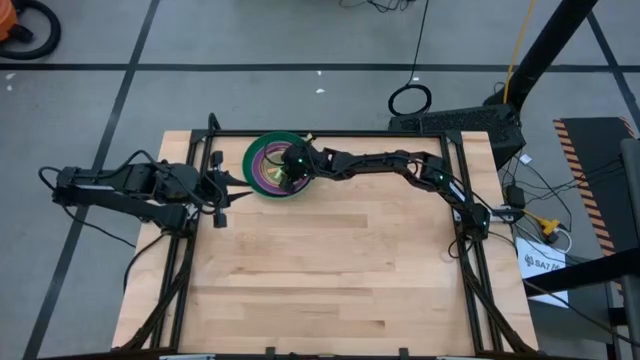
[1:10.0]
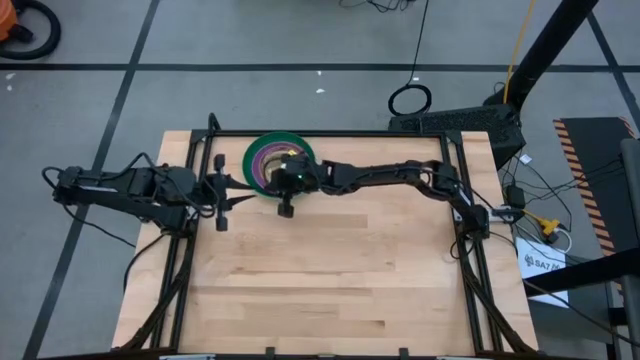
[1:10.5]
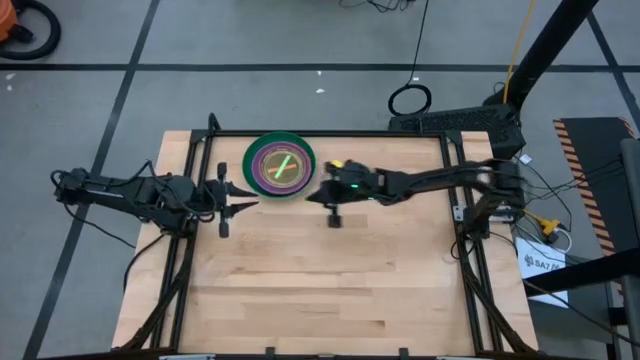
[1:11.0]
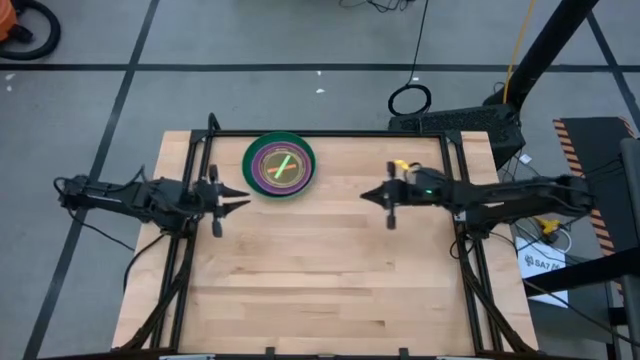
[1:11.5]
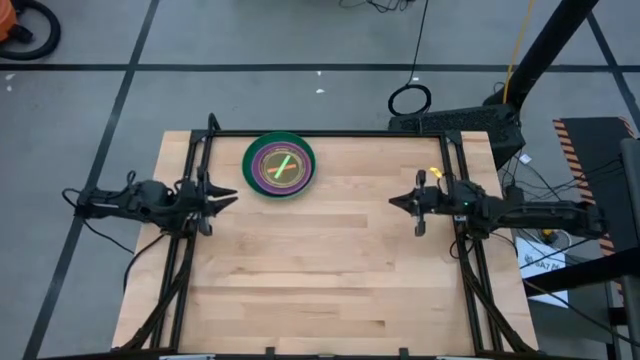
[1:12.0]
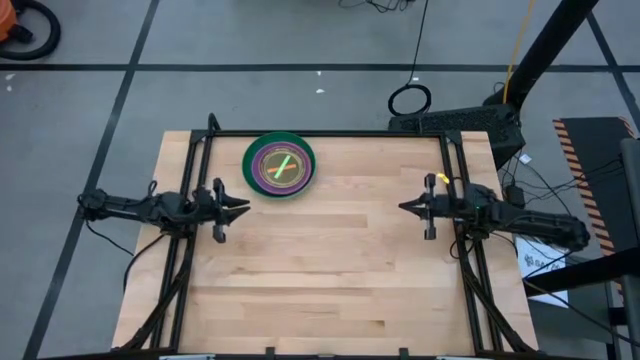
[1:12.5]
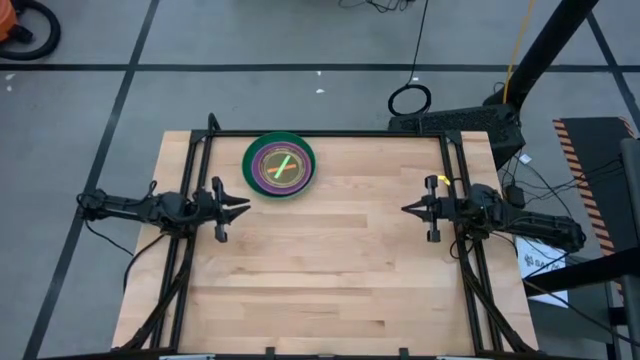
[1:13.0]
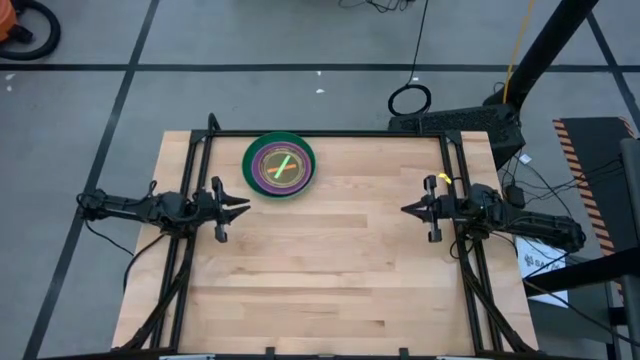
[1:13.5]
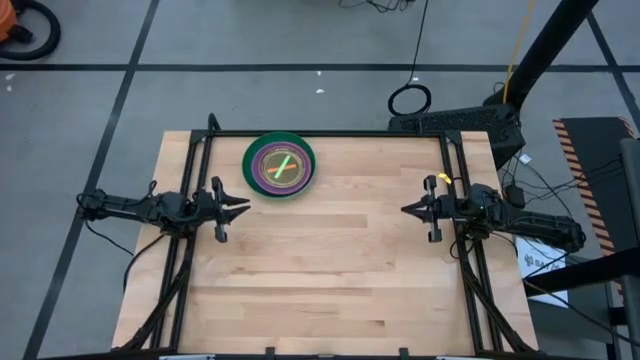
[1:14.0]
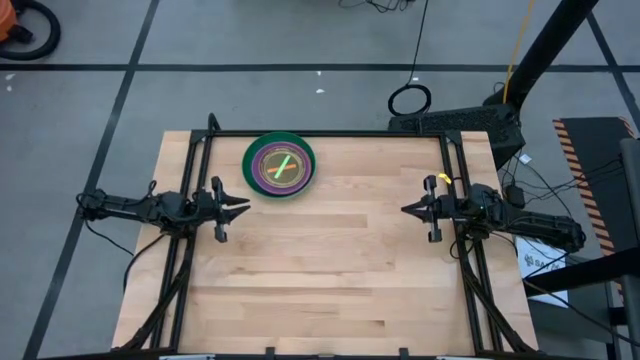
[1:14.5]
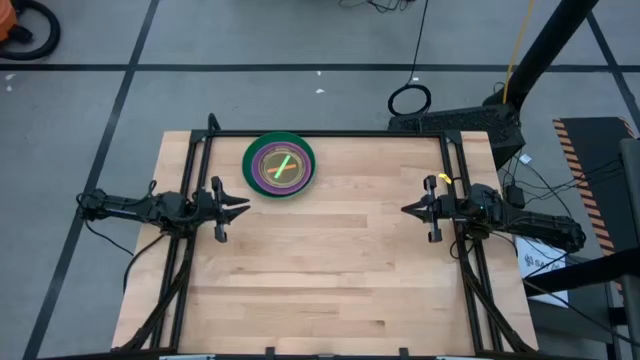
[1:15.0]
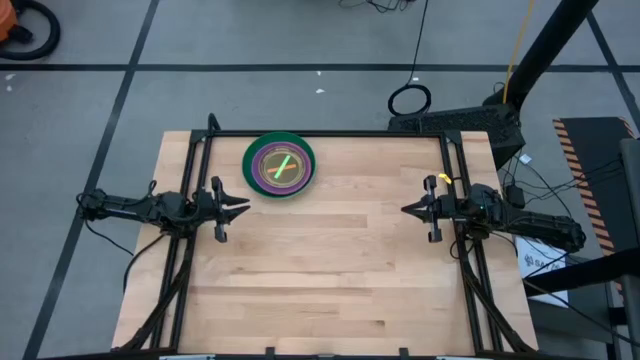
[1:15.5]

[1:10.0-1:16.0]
Task: Stack plastic plates
Return to Home Position

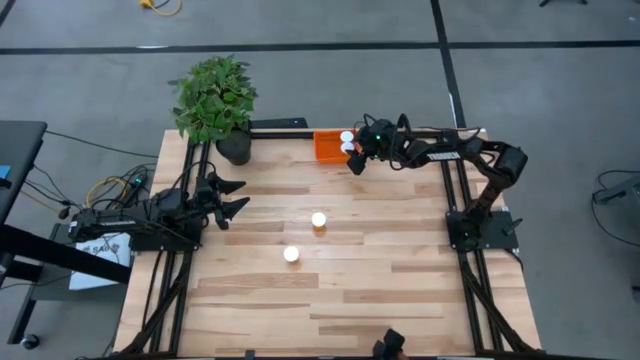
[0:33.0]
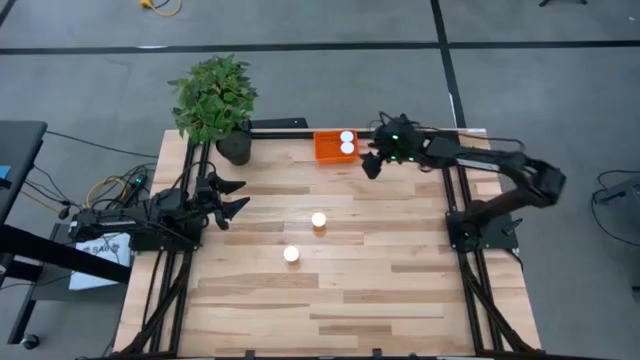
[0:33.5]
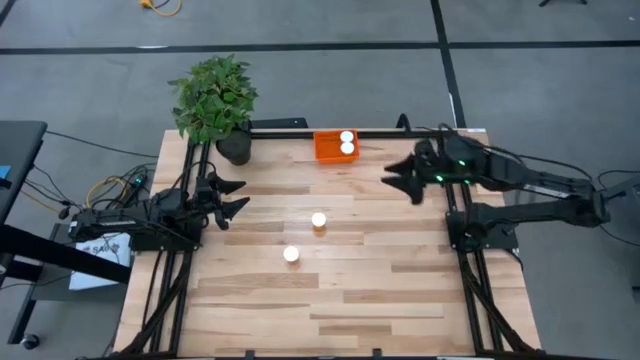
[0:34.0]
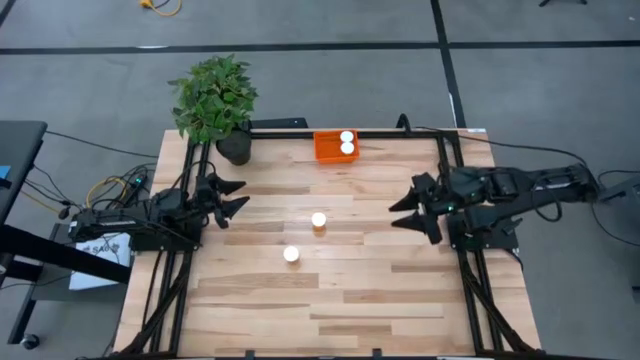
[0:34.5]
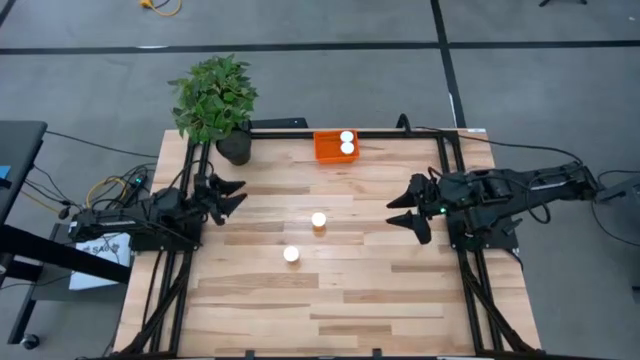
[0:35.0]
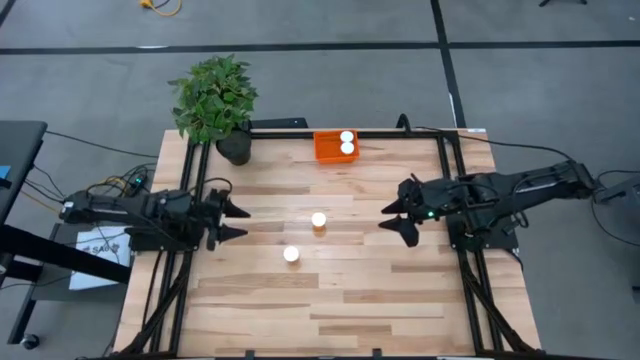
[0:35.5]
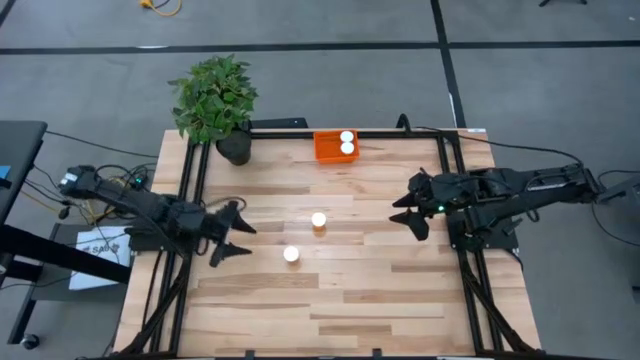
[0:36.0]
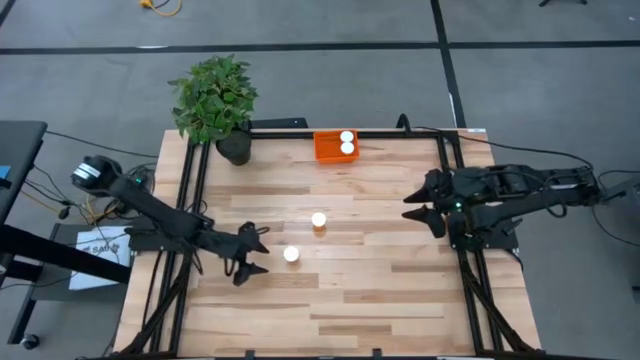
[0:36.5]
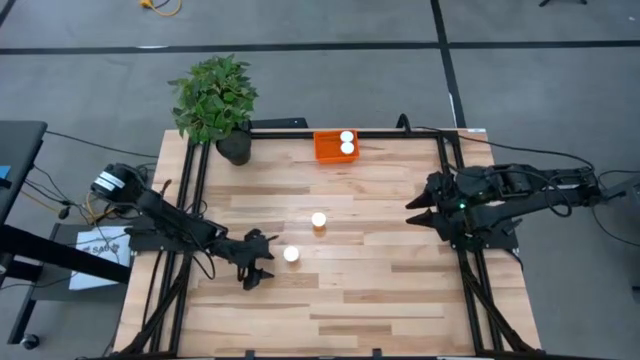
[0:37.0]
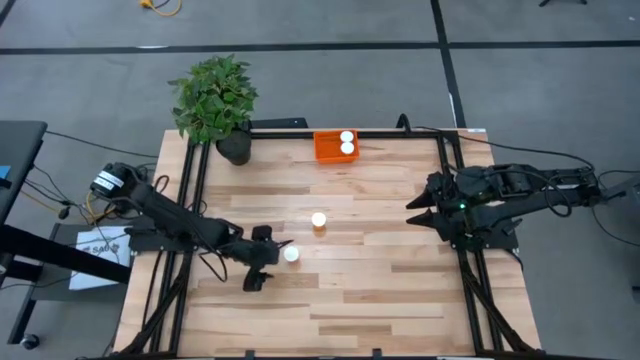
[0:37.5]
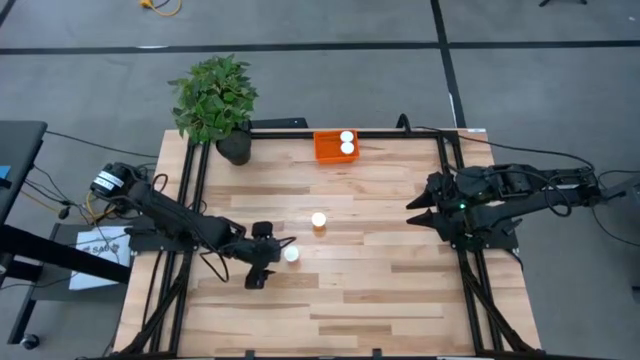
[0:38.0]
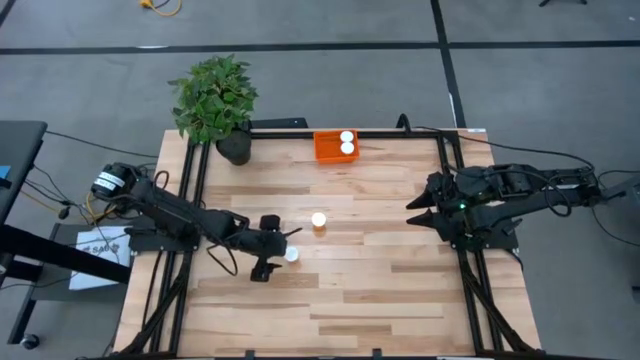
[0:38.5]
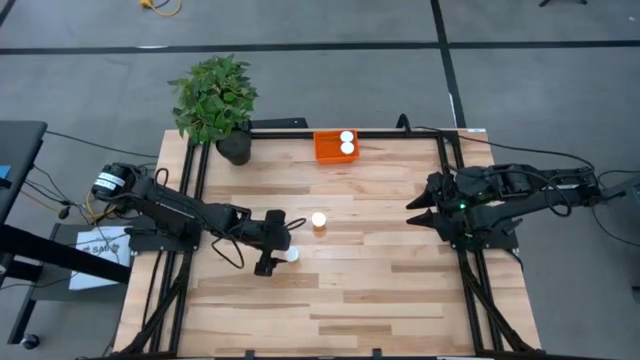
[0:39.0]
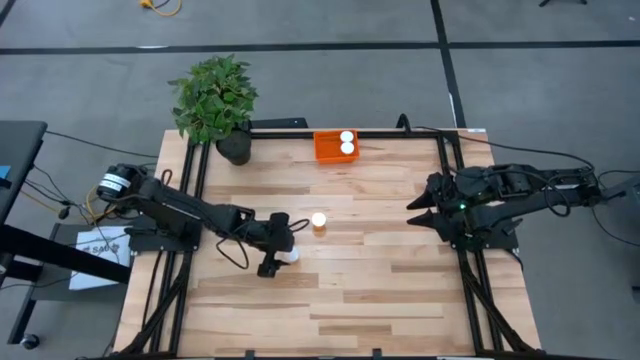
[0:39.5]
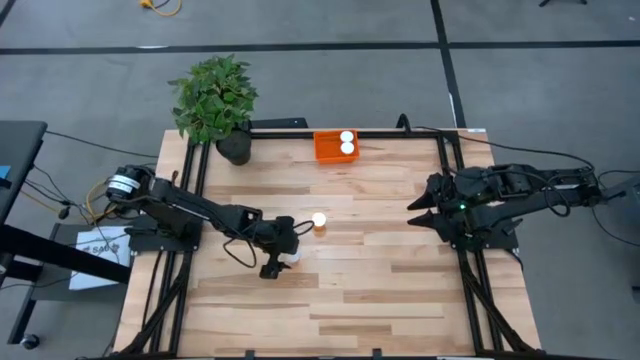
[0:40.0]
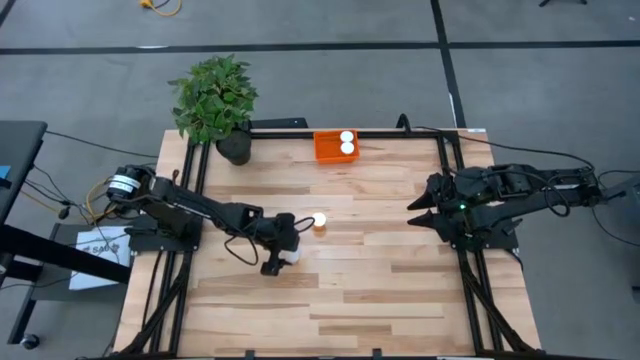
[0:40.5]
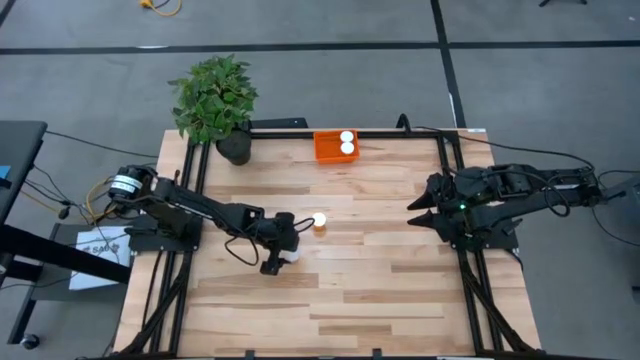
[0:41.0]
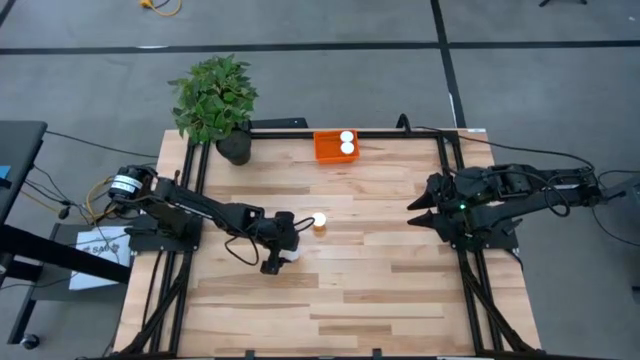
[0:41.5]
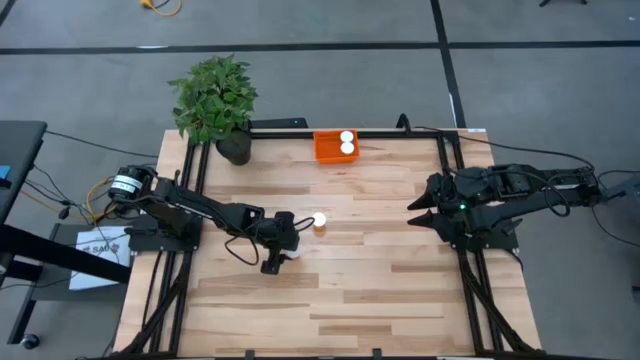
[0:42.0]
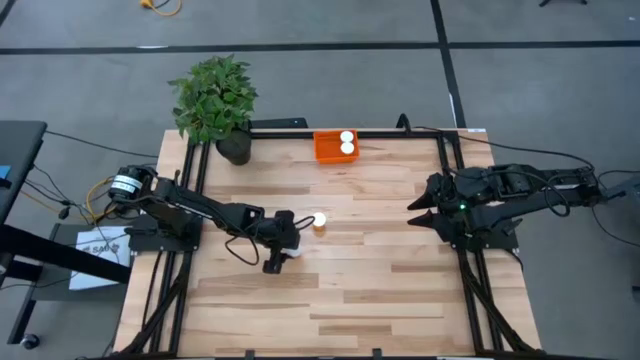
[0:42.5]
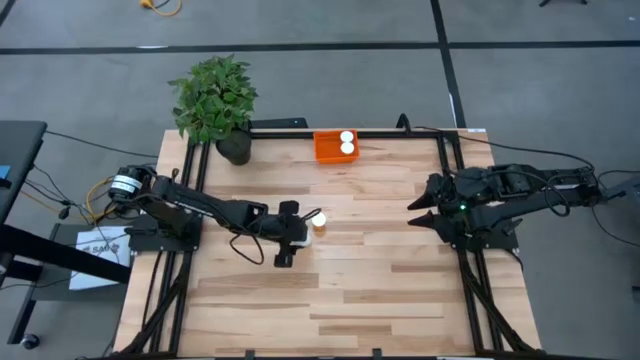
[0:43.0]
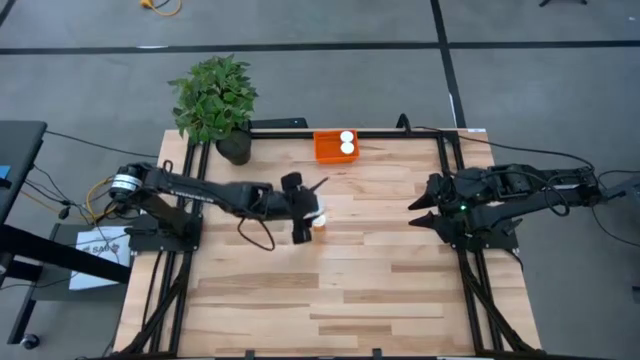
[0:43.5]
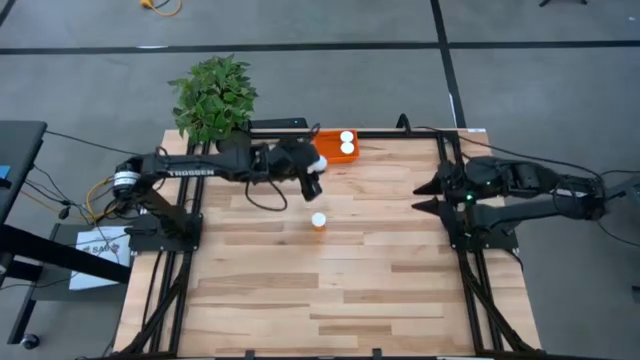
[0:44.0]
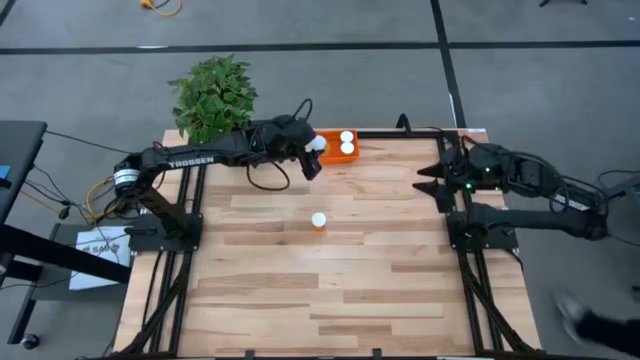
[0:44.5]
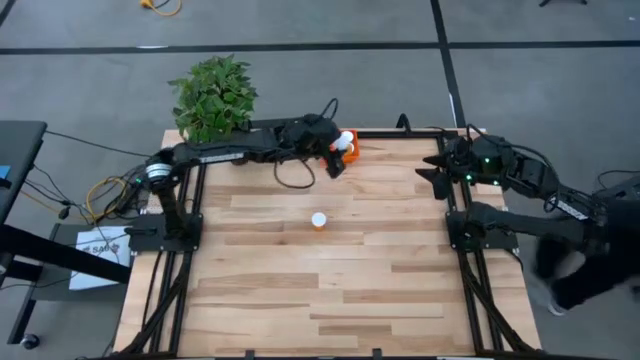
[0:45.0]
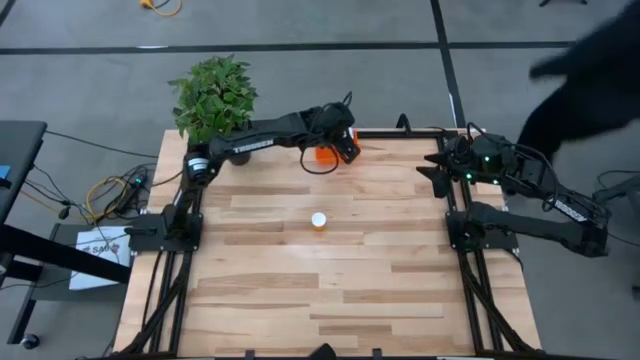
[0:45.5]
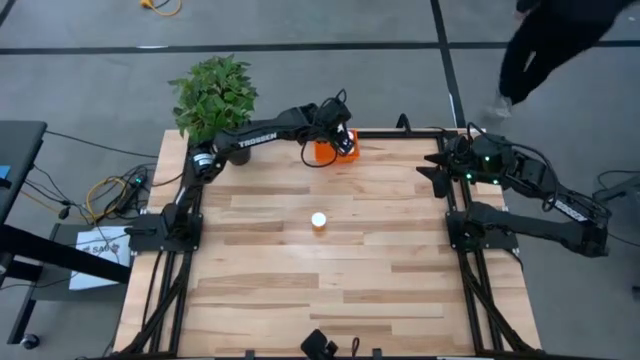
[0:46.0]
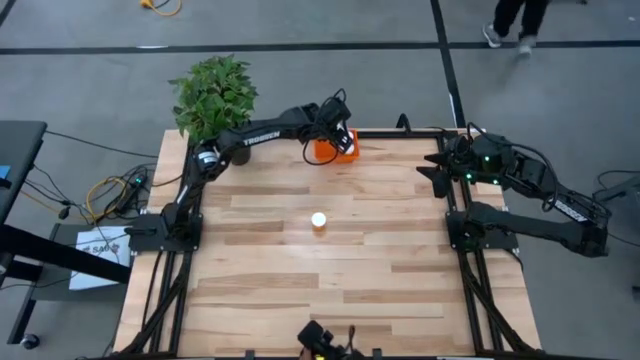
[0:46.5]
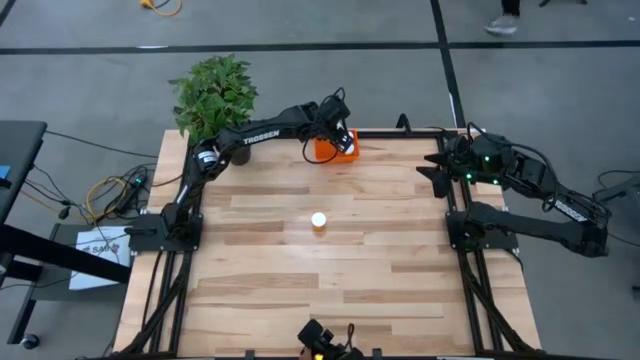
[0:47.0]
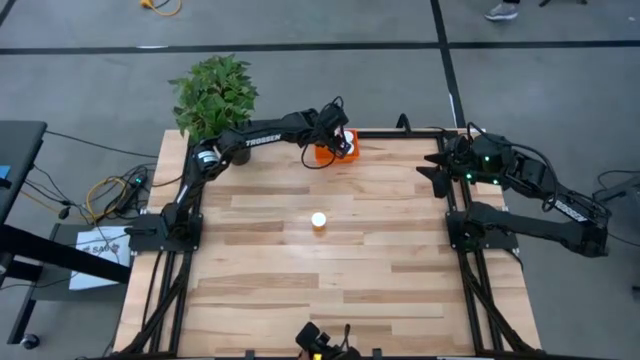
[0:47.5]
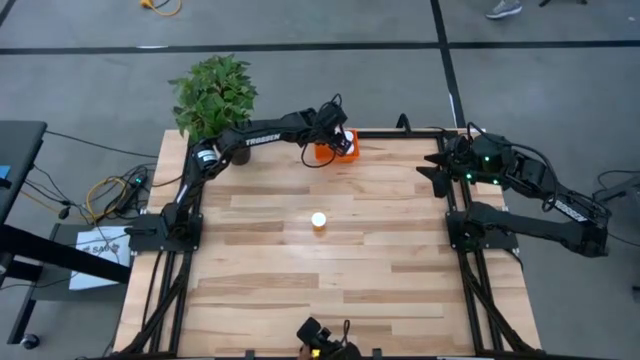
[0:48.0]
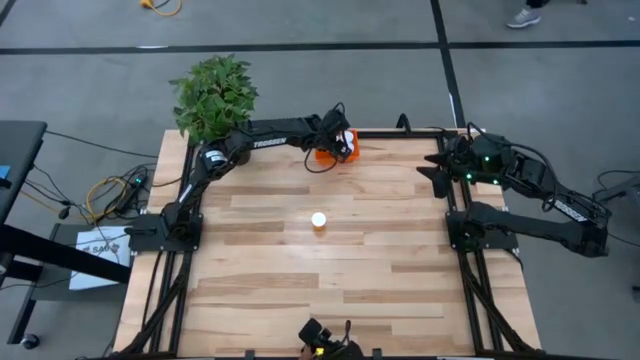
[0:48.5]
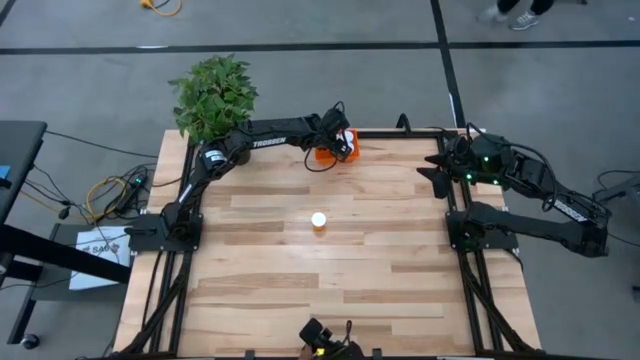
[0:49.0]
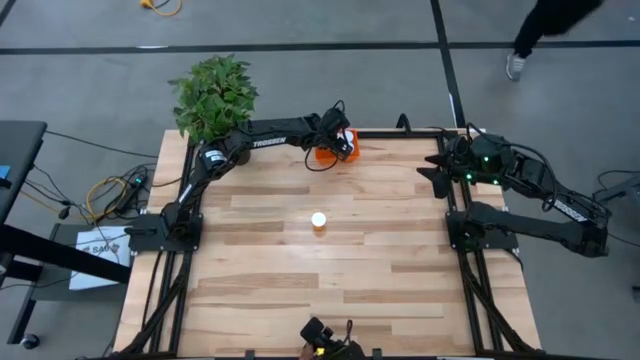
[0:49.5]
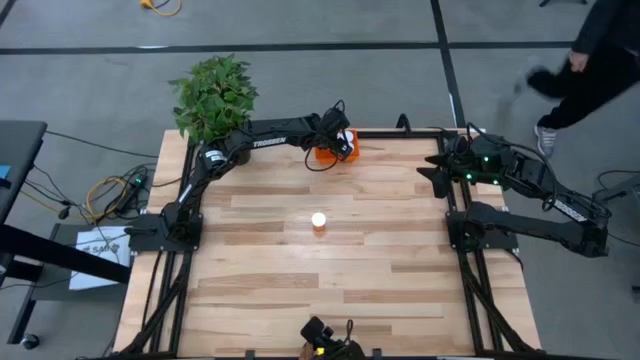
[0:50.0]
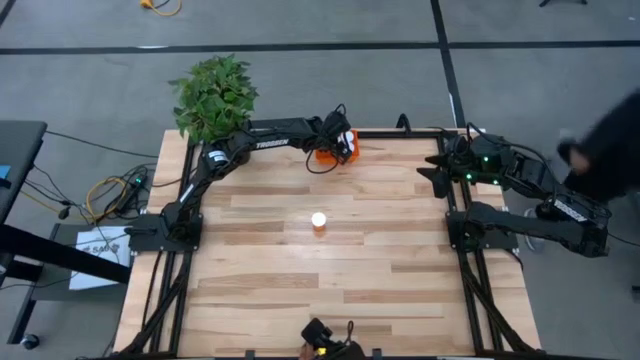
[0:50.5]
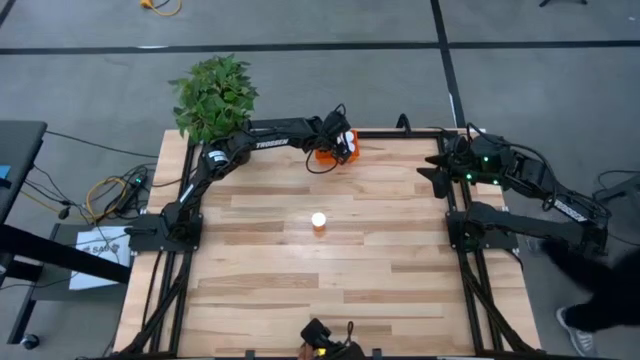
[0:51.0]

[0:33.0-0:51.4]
Task: Pick and place pill bottles into a basket
Put the orange pill bottle into the orange bin
